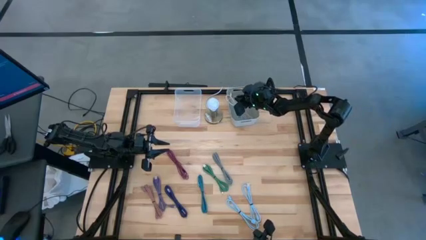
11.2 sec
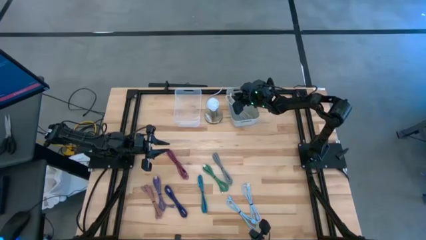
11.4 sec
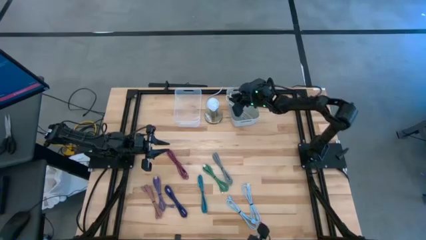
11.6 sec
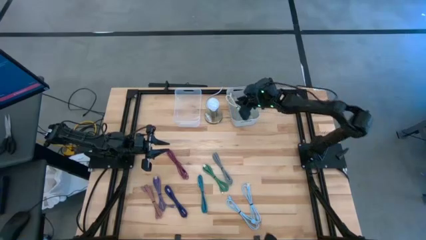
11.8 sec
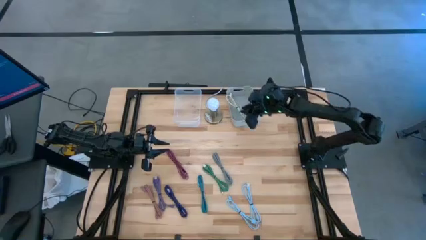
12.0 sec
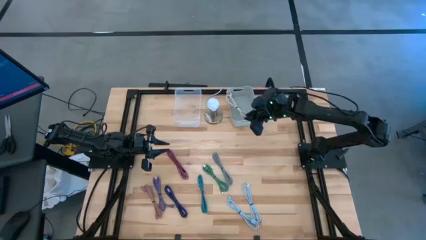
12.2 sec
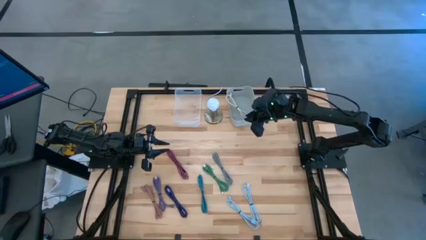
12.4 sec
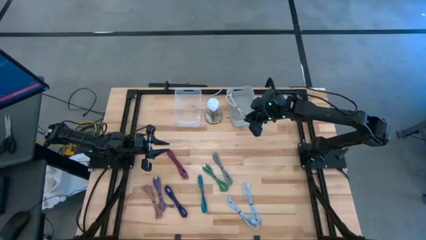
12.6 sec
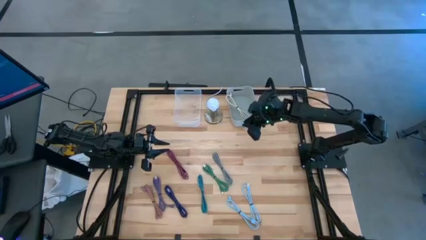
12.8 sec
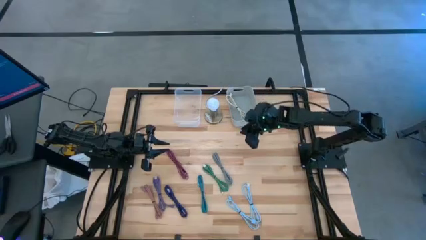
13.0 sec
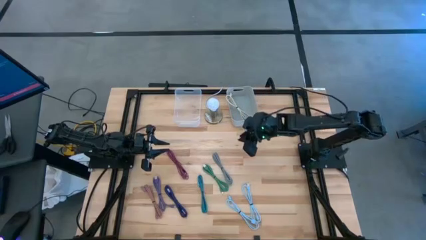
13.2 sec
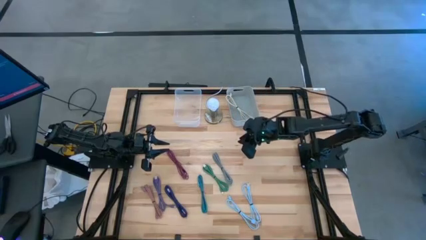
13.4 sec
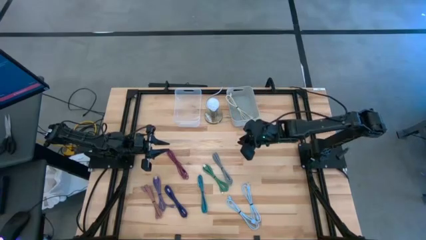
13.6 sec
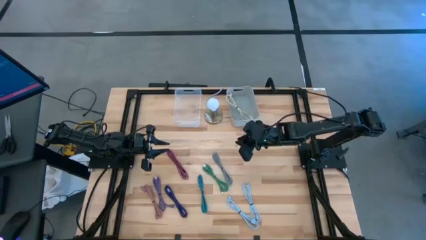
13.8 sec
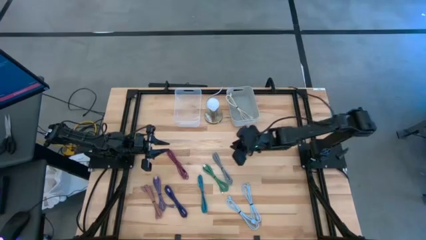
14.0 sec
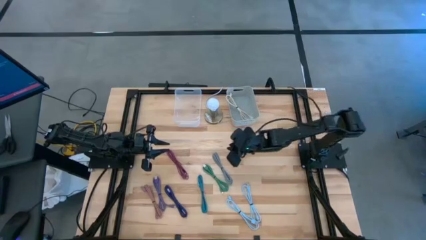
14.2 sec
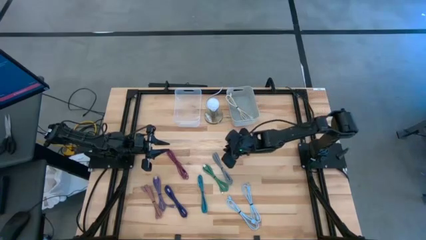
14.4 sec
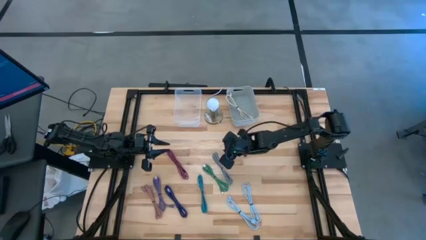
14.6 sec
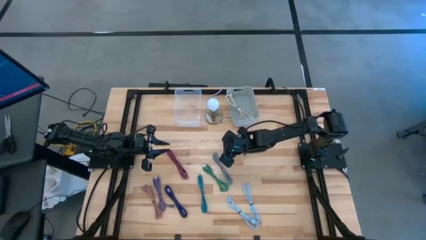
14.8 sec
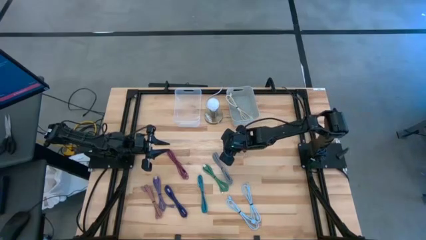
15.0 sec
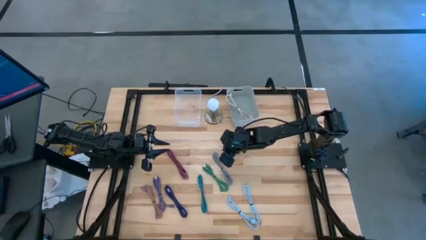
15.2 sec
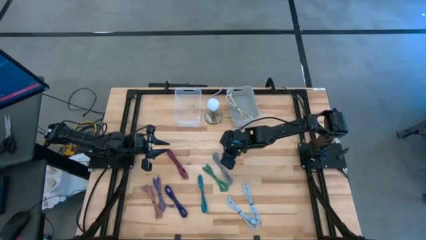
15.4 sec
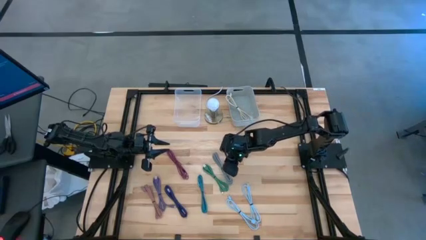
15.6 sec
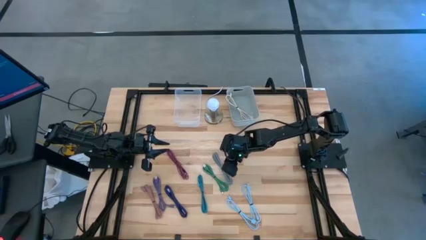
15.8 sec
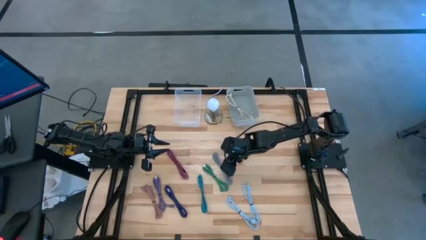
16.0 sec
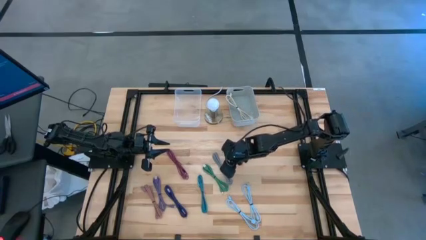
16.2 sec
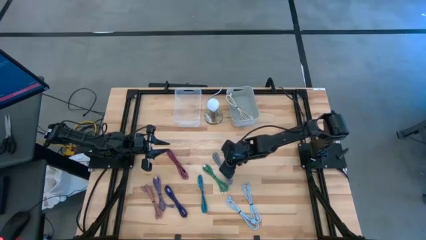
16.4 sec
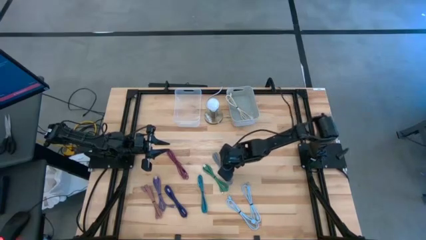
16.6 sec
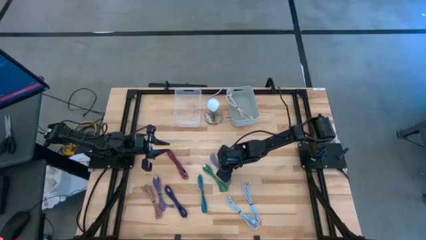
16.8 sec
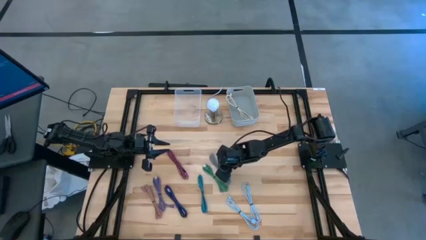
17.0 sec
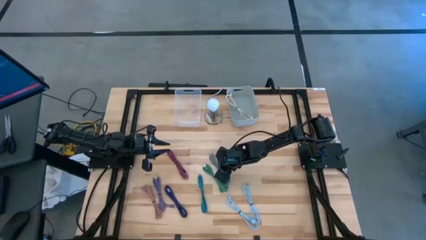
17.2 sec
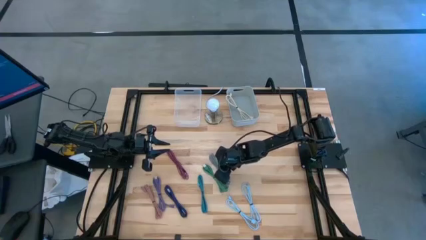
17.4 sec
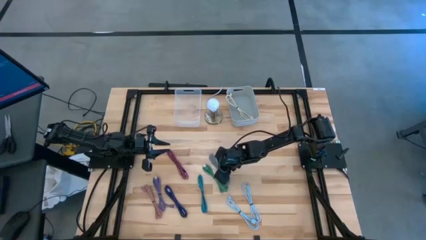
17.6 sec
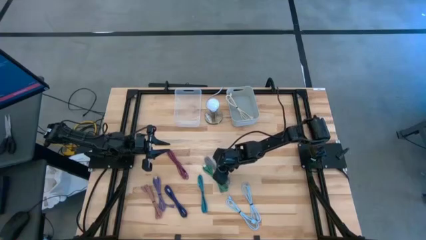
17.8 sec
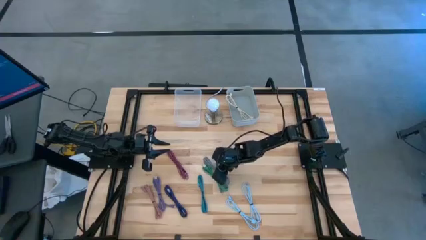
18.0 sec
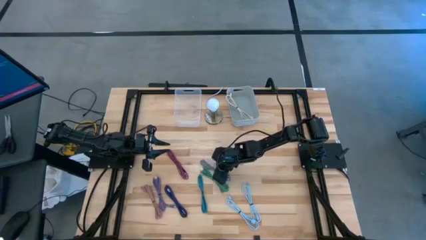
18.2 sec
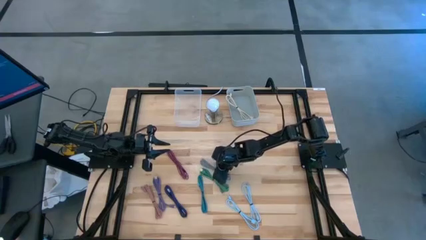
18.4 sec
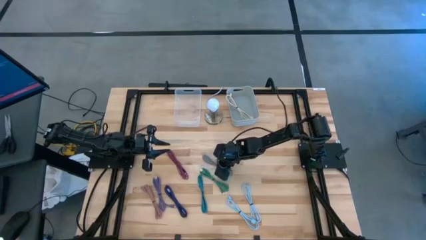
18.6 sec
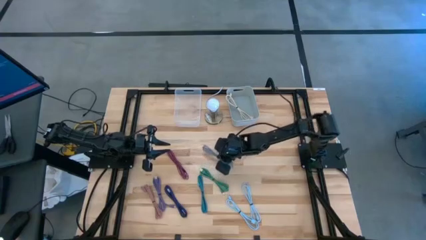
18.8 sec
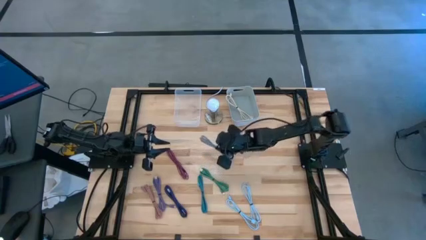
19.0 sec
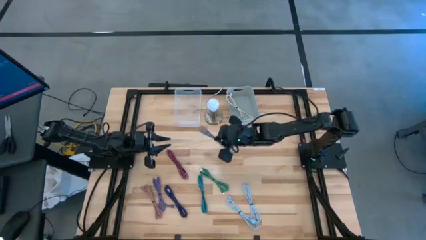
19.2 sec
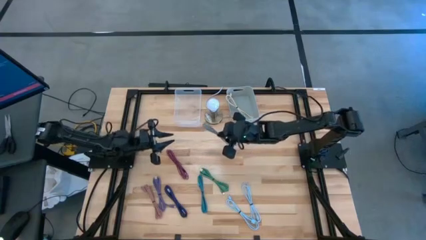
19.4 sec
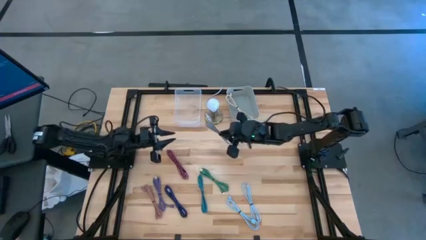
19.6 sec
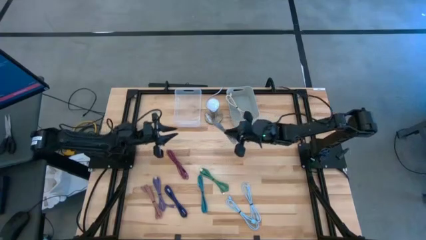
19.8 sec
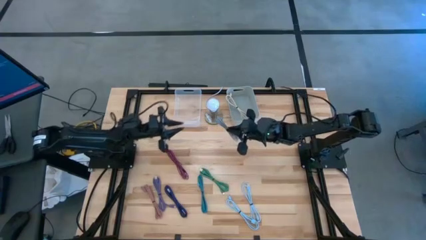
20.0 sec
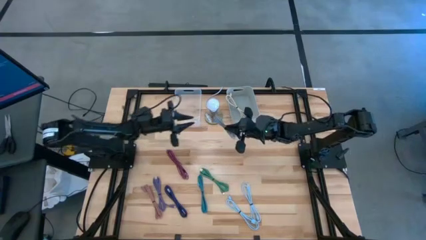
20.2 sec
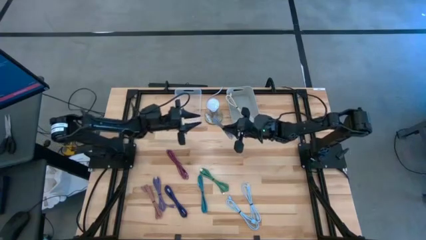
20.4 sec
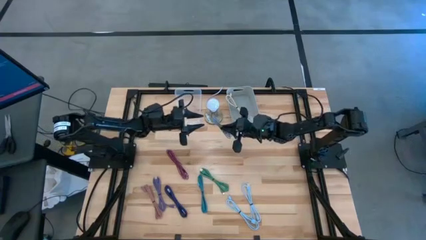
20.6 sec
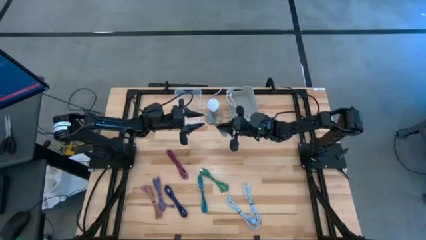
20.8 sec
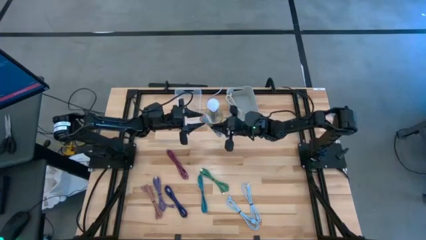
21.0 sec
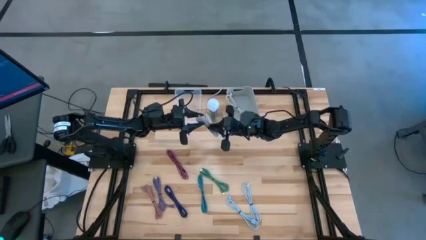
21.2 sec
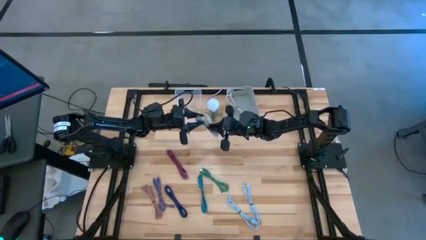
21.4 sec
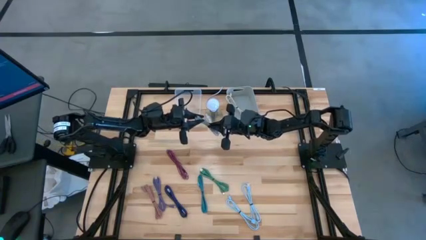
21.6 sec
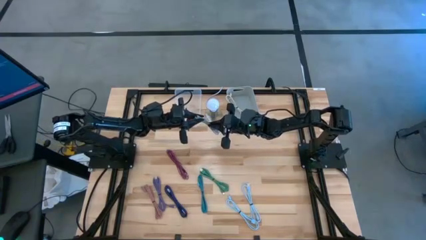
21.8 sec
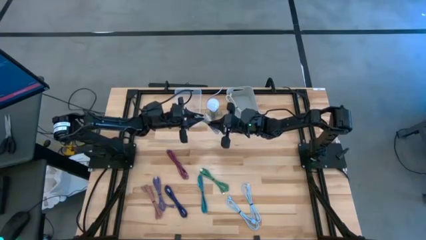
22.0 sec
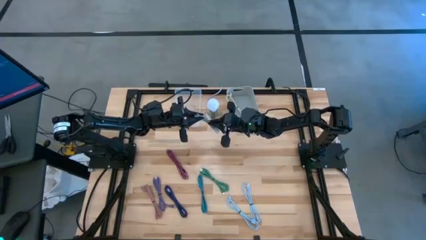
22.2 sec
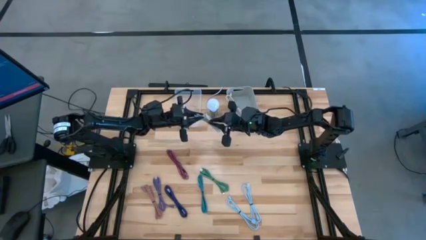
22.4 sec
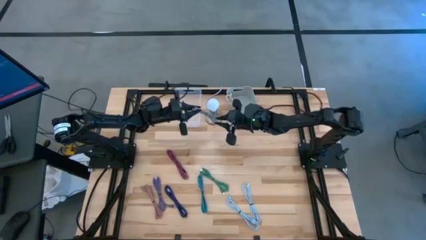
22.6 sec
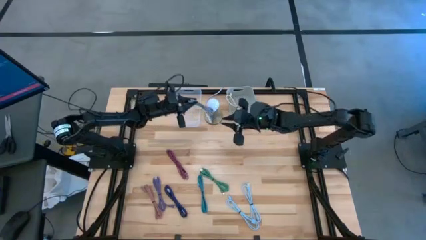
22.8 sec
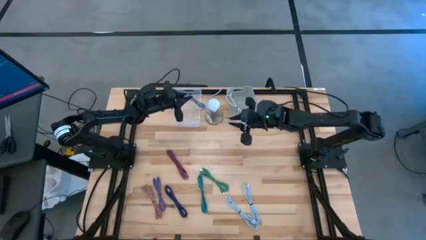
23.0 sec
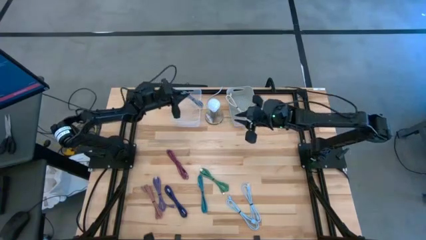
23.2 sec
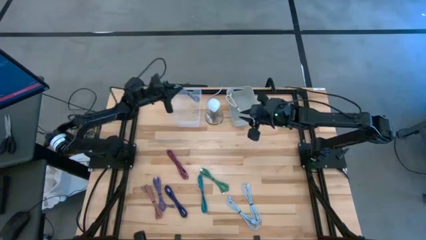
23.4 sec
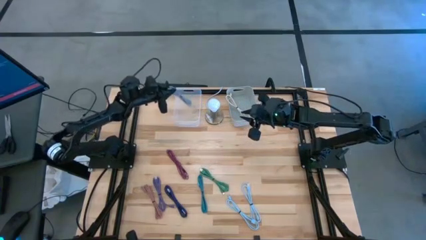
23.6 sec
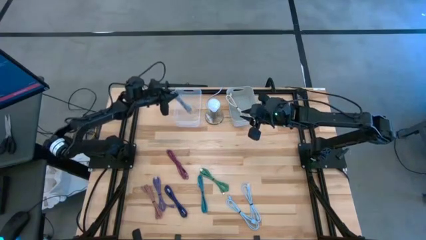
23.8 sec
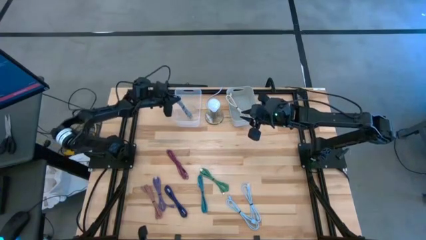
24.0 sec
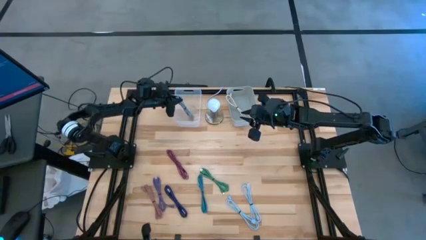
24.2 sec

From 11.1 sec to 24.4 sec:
Task: Pick & Place USB Port
Put the white black charger cable into the transparent bin

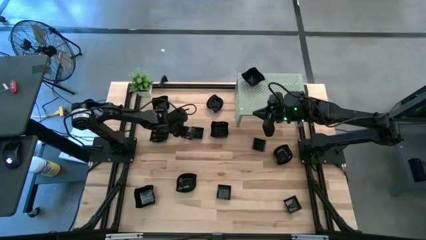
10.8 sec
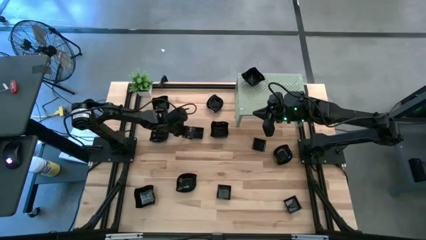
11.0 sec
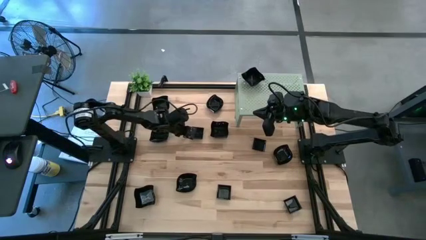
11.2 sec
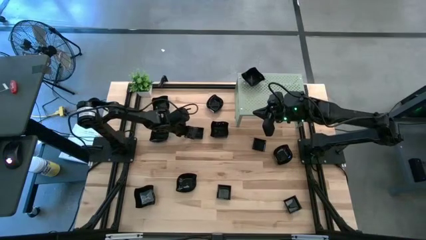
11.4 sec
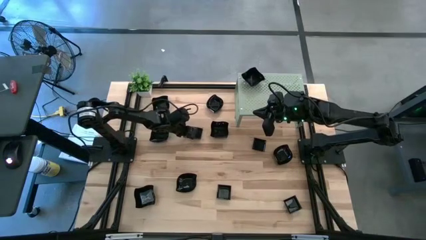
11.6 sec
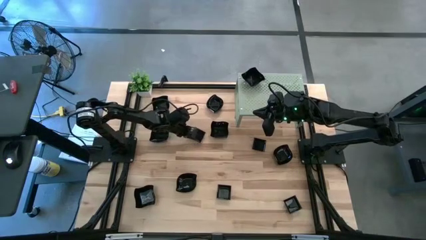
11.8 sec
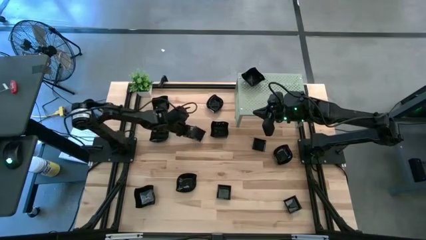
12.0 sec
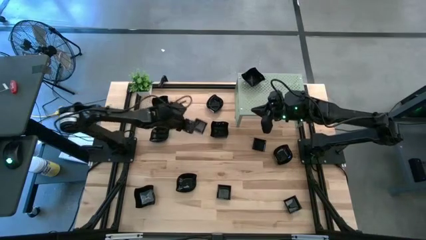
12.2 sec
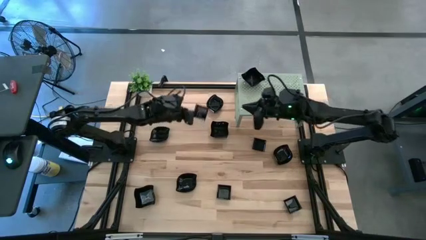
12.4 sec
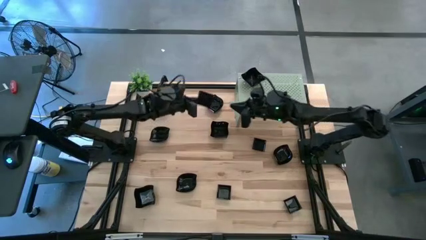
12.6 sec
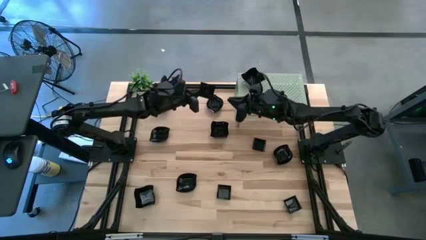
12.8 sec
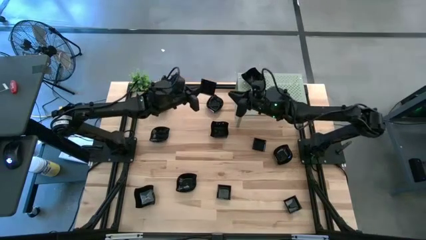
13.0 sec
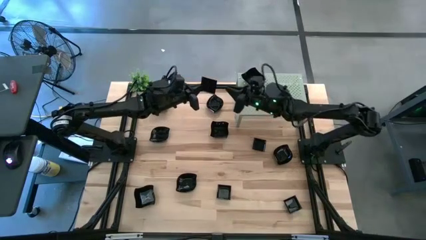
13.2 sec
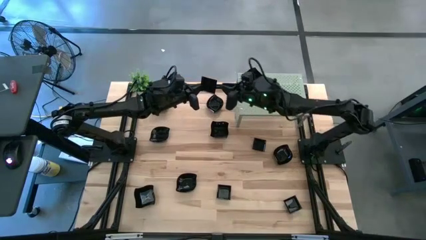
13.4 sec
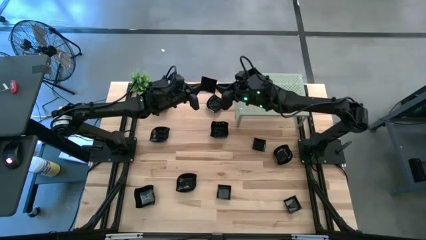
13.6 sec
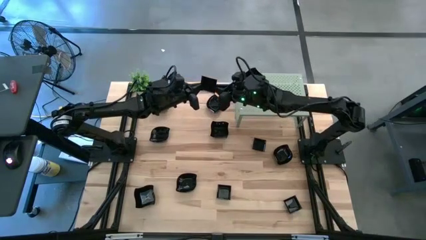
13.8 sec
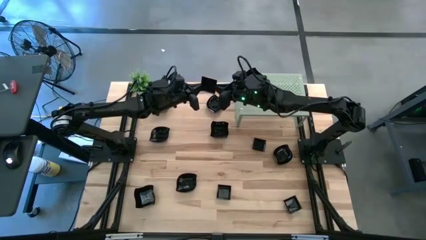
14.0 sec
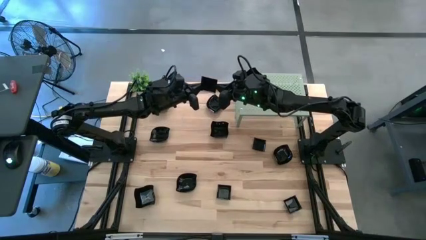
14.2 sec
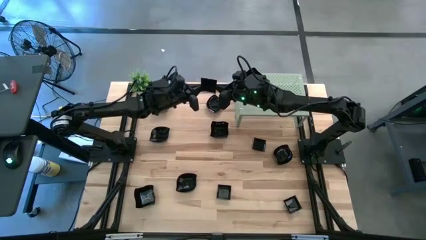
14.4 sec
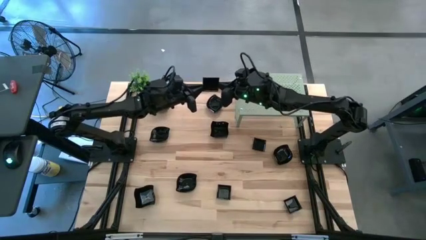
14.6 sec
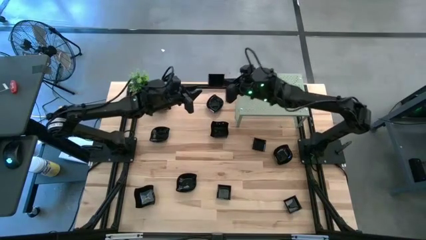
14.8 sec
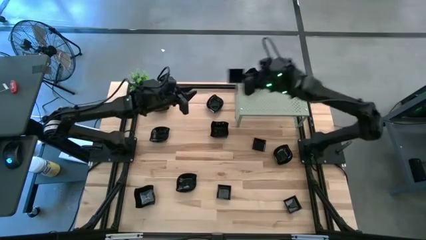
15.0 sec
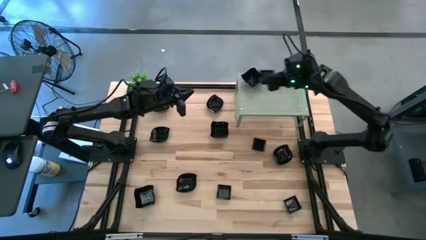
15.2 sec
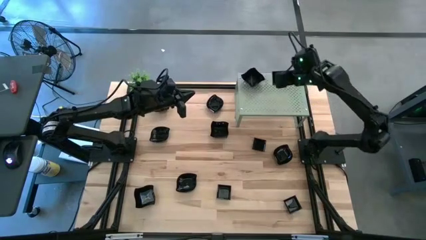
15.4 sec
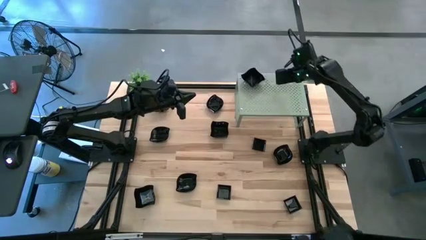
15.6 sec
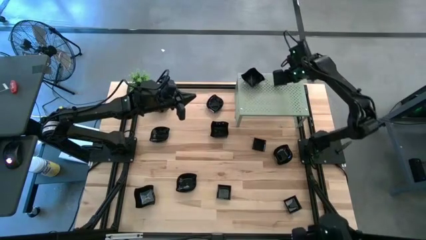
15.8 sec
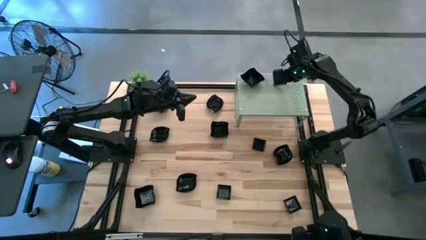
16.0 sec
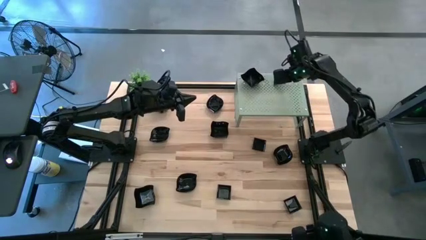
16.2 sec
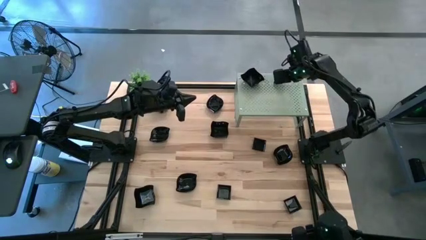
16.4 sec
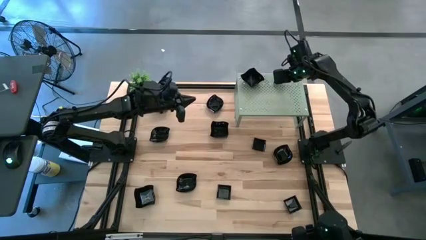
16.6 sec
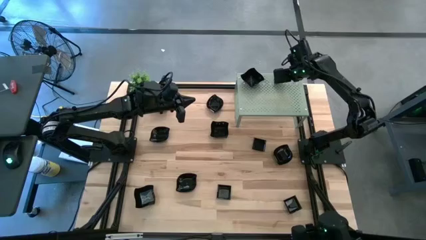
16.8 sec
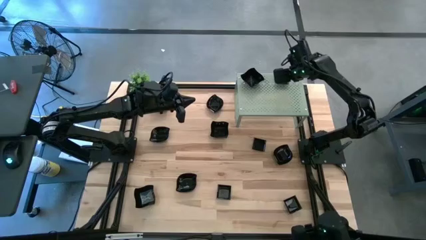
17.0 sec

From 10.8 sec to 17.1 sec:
Task: Pick & Place Mini shaped plates
Put the square plate on the shelf
